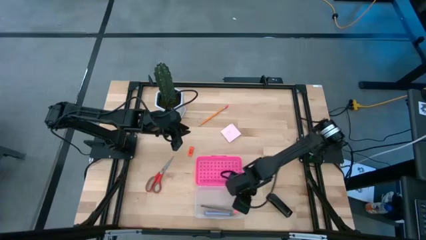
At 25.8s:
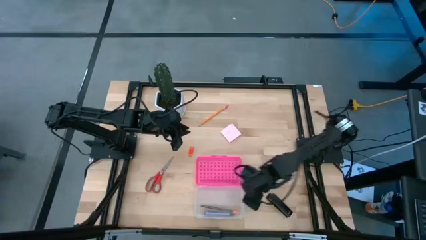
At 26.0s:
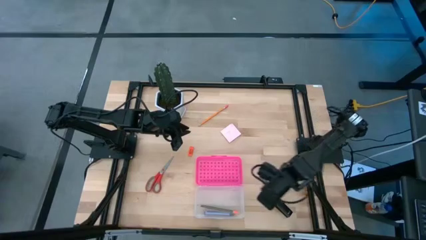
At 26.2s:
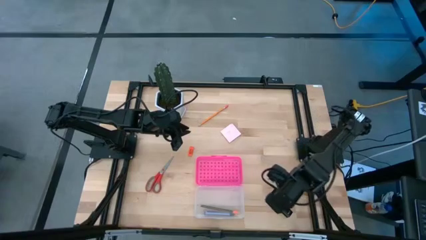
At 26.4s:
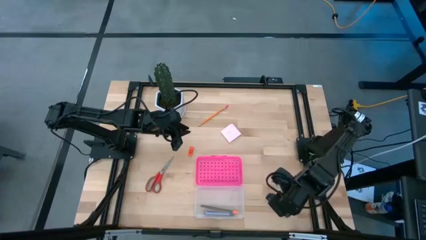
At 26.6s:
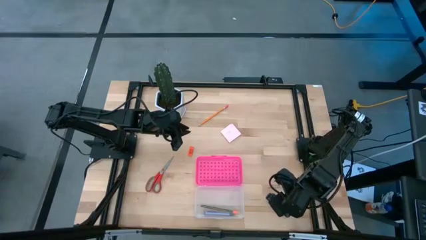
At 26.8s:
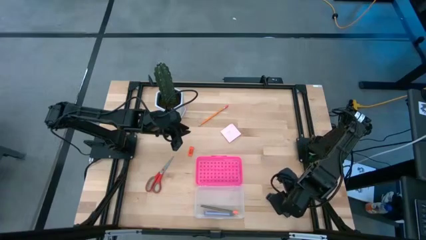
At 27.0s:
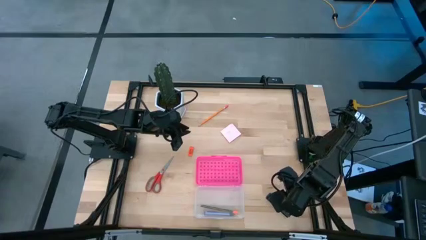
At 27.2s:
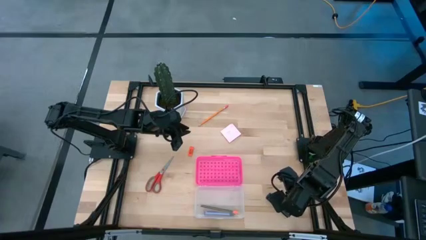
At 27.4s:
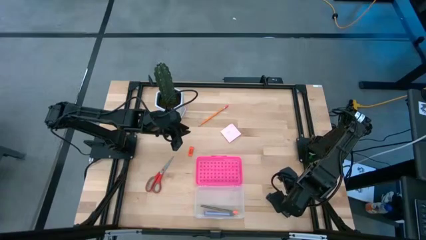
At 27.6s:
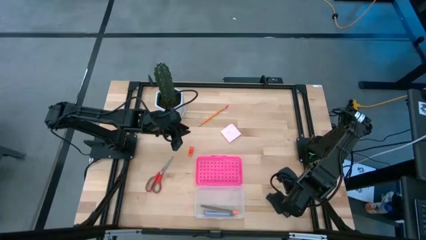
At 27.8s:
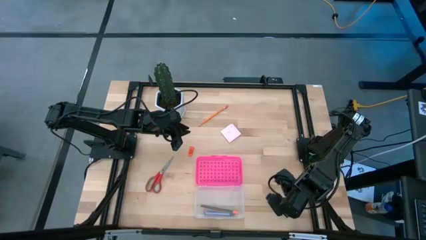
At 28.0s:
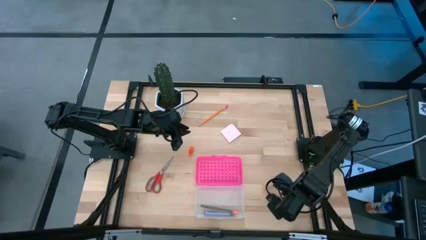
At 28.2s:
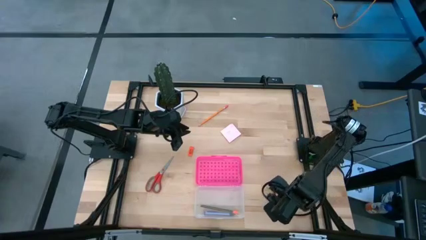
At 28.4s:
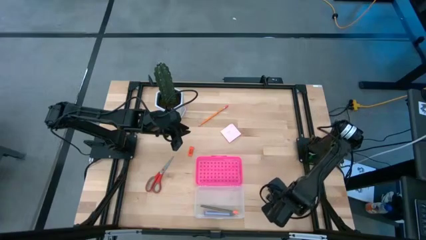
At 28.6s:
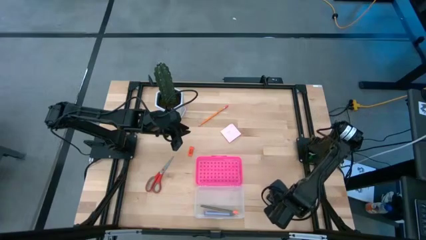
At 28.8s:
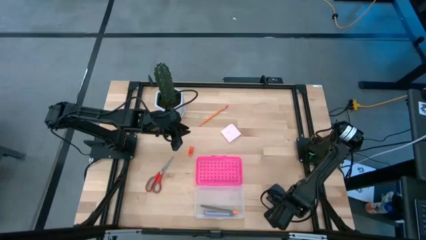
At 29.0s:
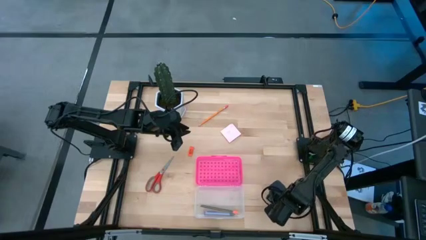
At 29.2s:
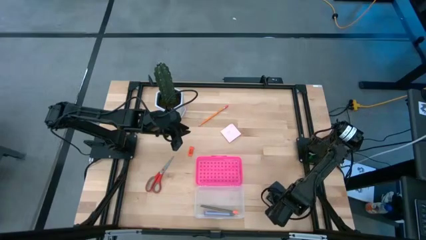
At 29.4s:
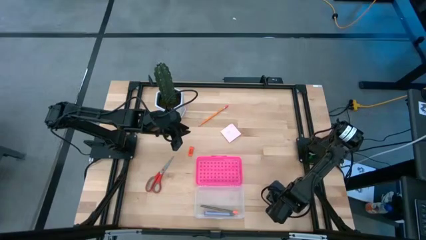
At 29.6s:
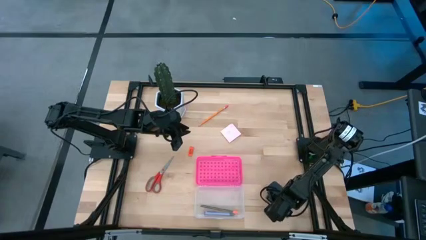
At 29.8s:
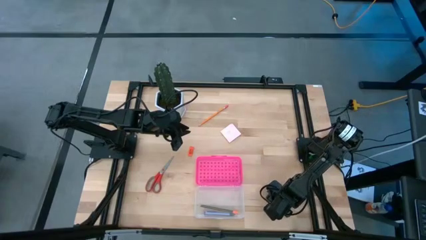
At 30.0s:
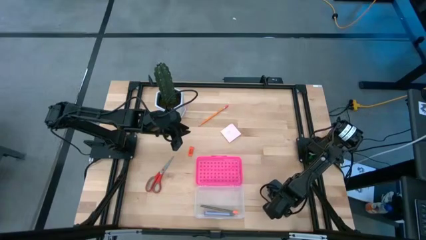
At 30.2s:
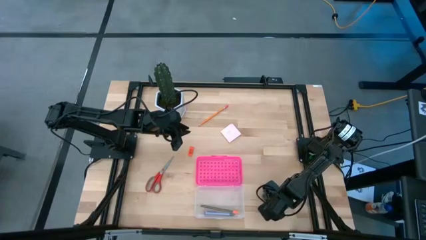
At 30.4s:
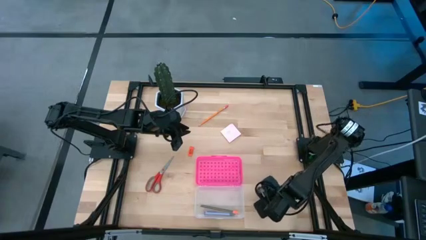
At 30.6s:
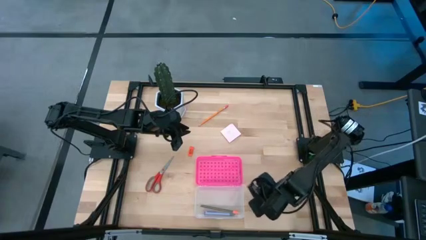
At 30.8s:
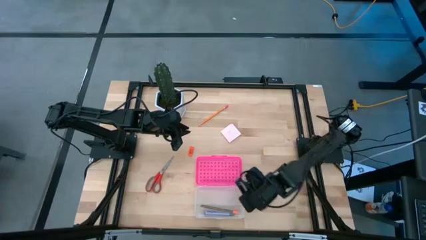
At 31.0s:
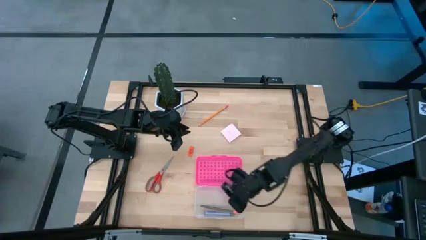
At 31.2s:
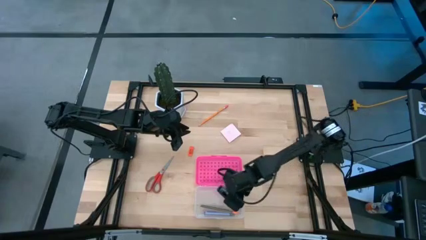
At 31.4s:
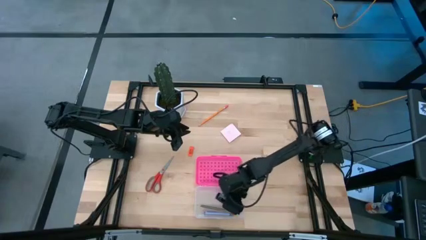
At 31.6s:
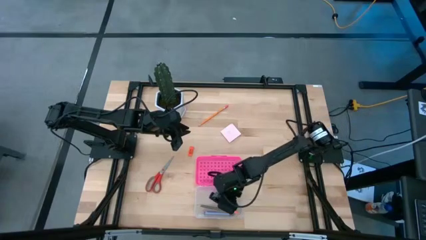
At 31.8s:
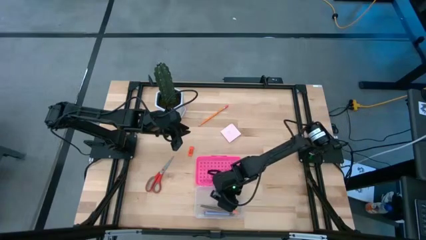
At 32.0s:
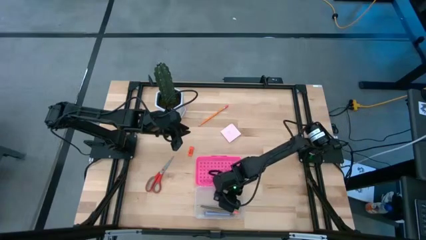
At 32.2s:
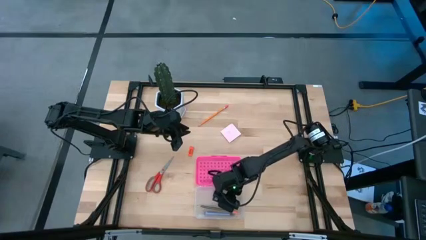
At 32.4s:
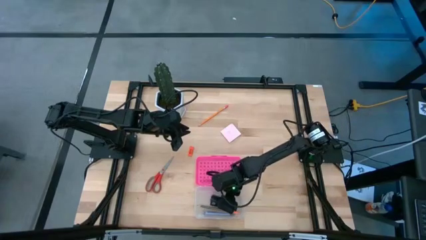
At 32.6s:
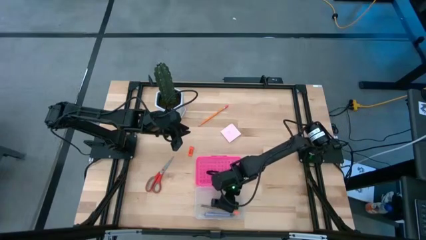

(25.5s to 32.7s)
Task: Pack school essentials
Put the black stapler into the pencil case

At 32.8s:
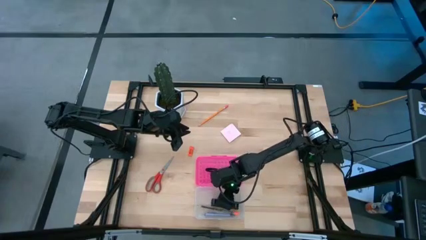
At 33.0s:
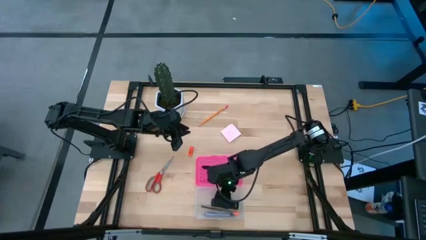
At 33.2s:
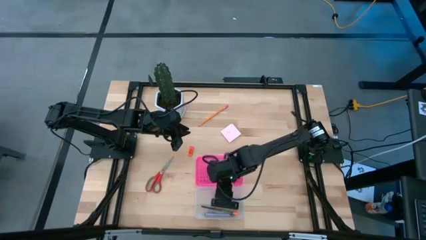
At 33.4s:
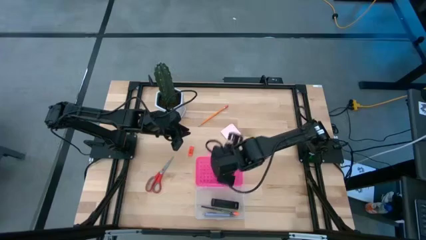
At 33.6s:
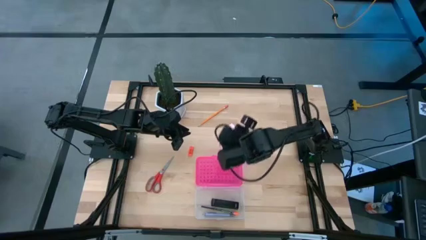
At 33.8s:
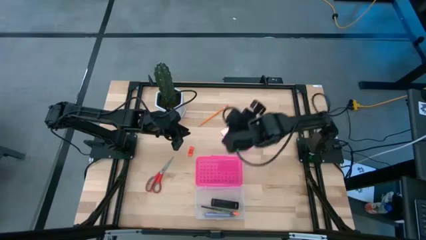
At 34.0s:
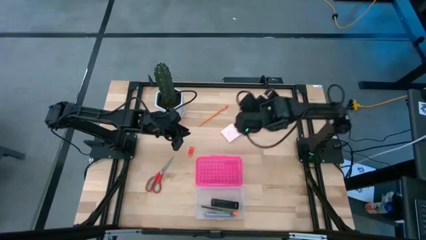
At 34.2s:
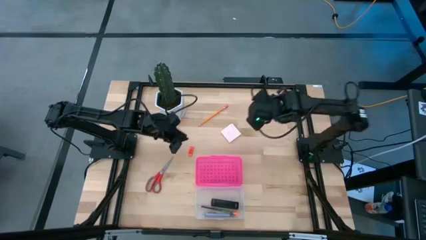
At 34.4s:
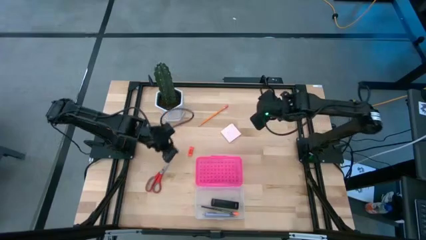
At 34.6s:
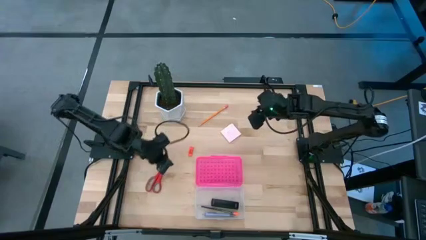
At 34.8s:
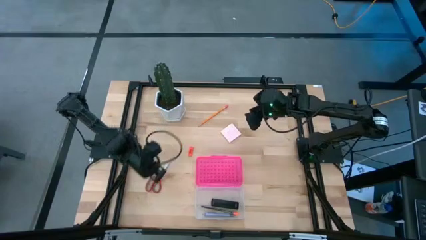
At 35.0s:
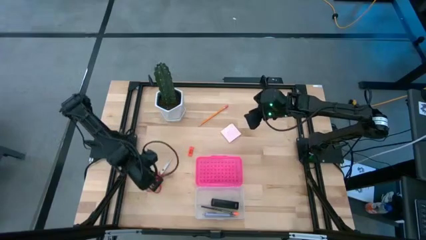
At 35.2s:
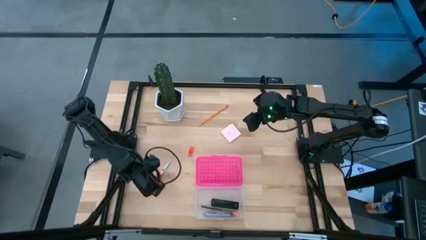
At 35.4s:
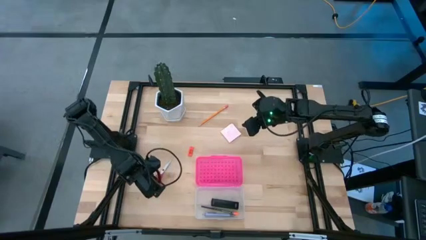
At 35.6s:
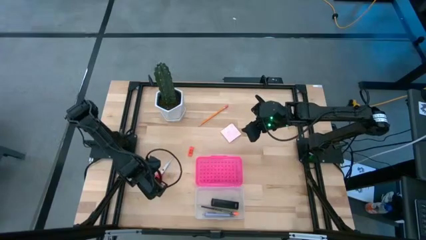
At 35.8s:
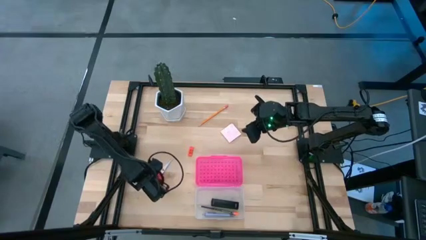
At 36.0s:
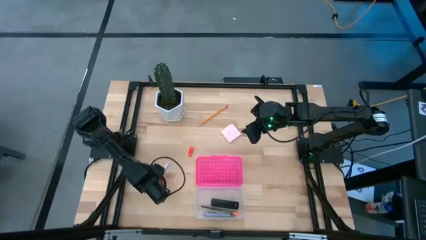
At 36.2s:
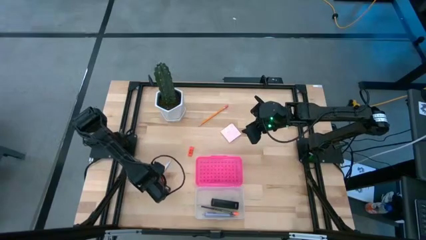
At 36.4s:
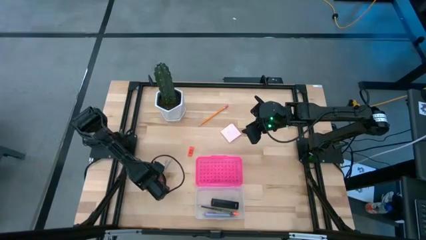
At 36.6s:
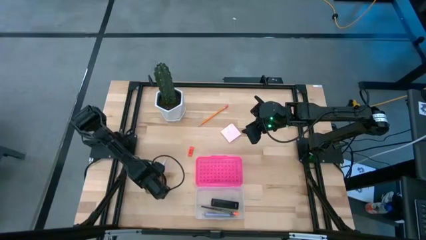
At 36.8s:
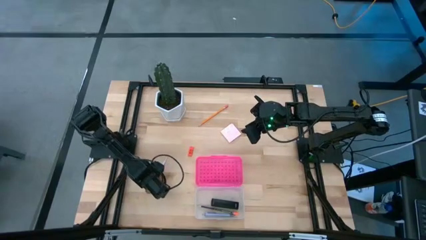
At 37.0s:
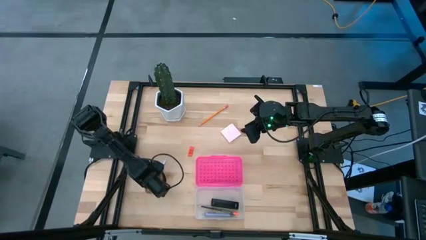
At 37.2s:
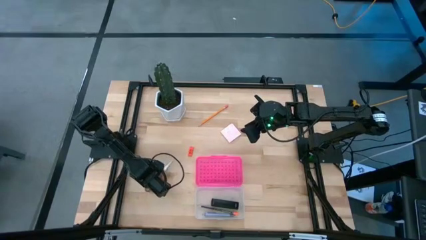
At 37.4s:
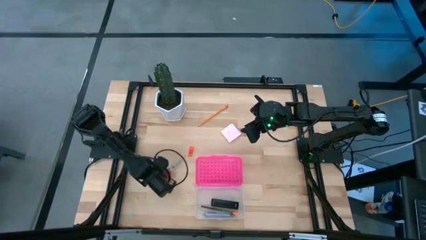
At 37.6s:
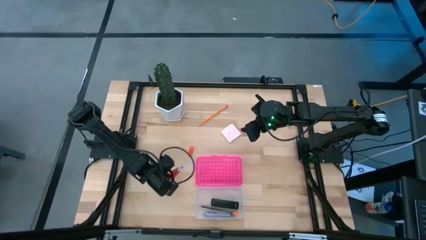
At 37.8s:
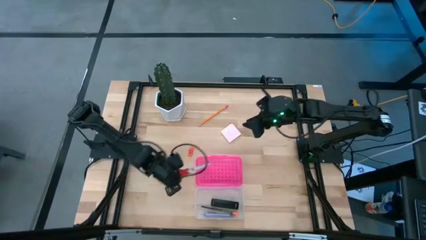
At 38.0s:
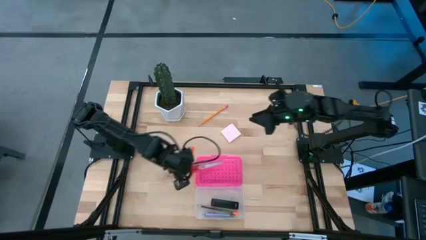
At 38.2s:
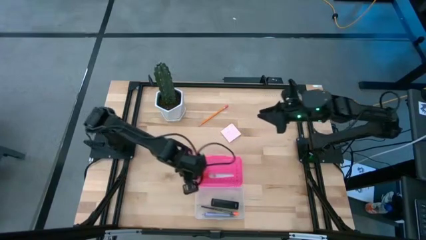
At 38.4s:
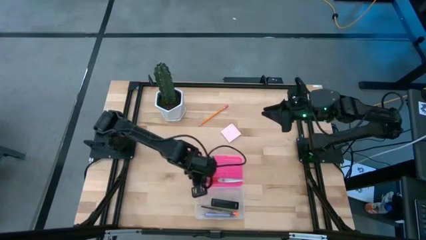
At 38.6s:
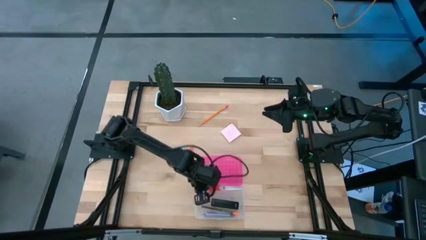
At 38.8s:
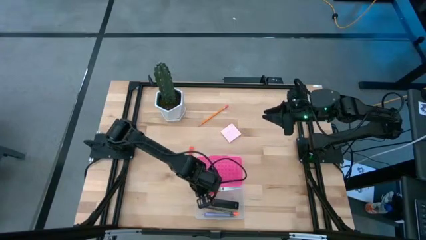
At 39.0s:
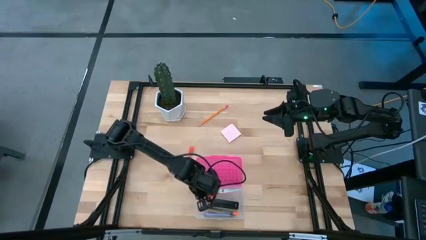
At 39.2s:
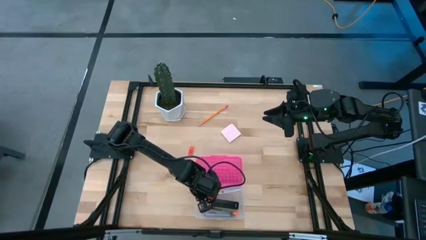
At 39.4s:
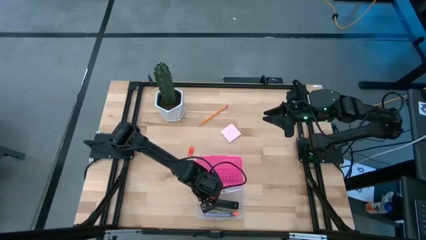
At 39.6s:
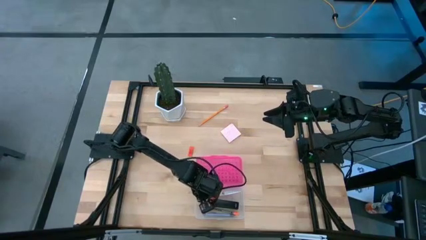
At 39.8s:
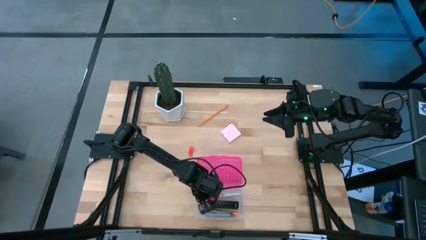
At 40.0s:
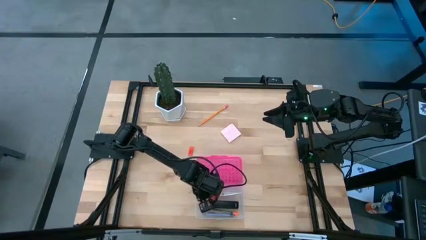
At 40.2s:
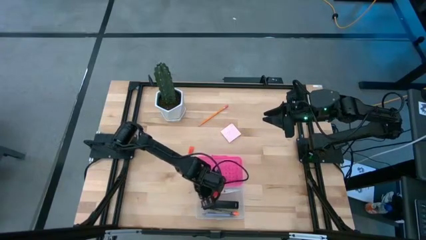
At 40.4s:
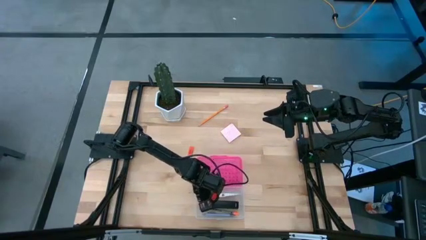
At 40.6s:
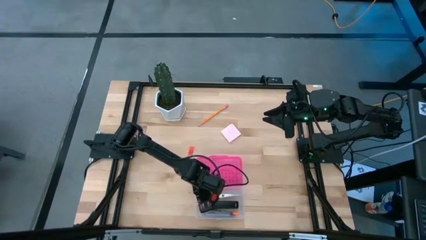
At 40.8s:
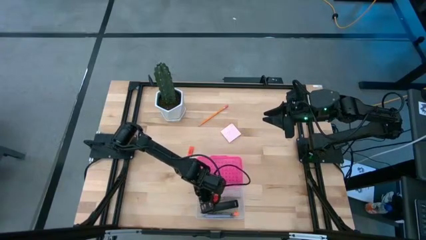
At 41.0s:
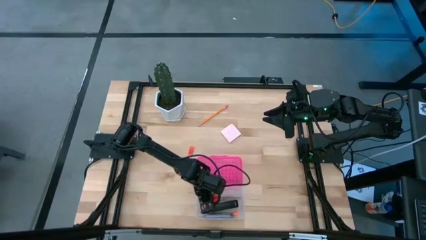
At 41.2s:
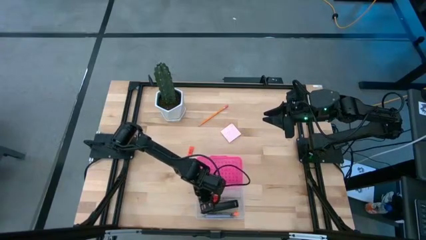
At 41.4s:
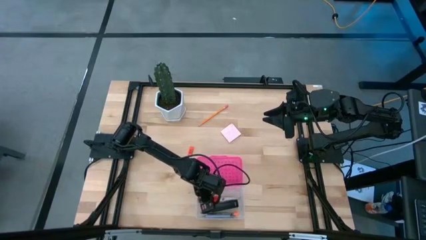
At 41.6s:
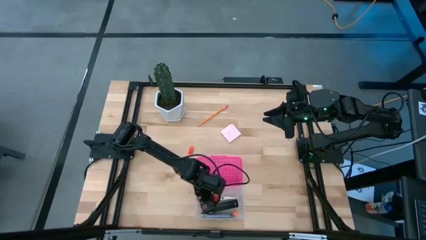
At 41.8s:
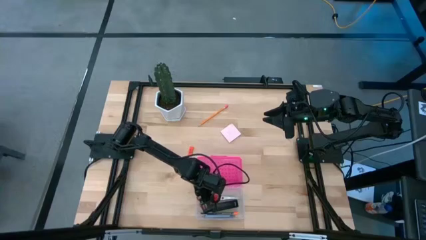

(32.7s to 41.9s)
Put the red scissors into the pencil case
